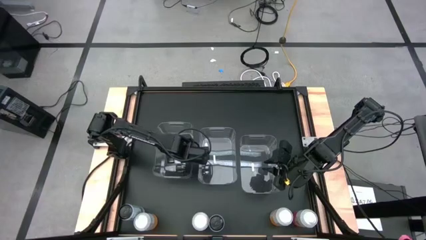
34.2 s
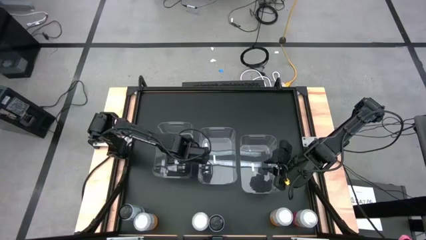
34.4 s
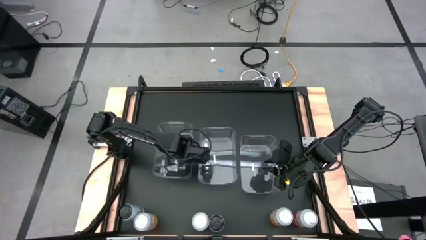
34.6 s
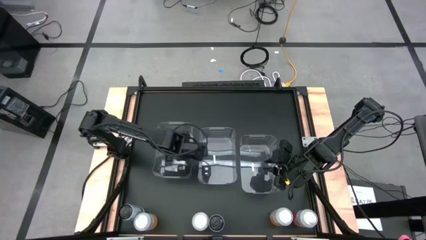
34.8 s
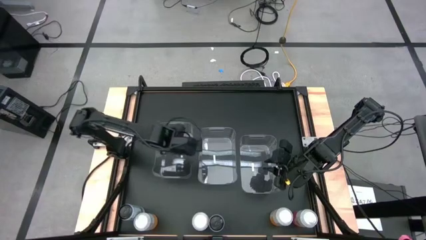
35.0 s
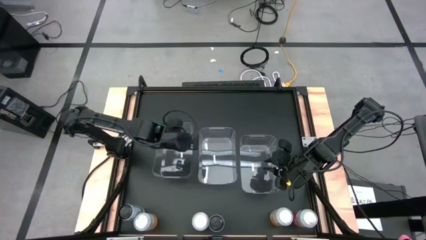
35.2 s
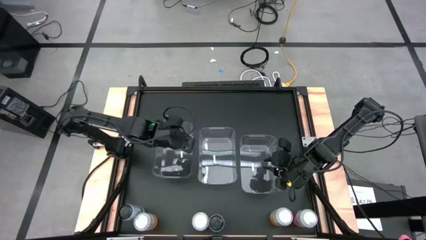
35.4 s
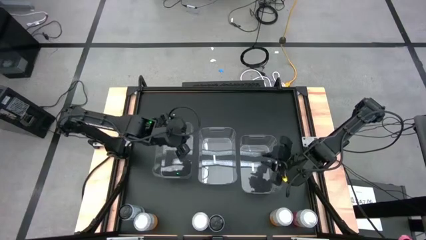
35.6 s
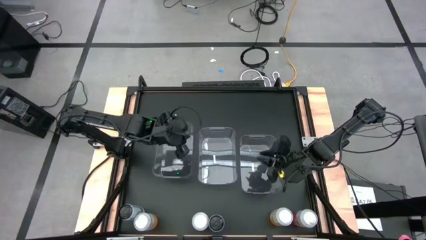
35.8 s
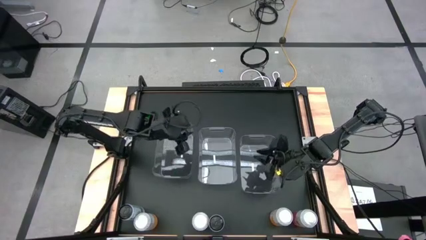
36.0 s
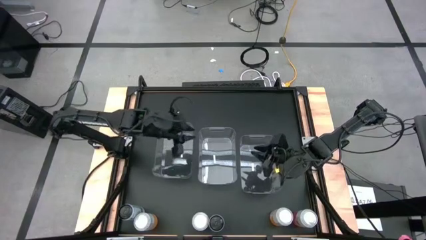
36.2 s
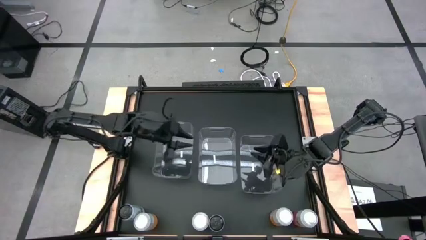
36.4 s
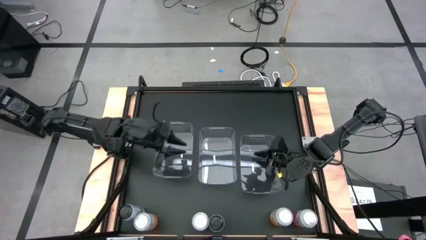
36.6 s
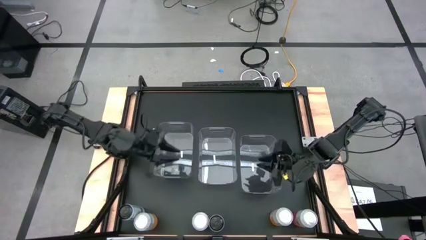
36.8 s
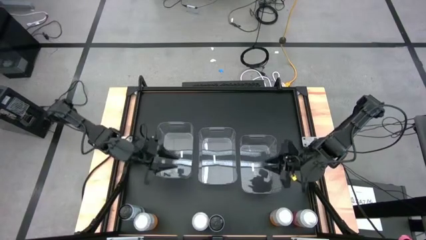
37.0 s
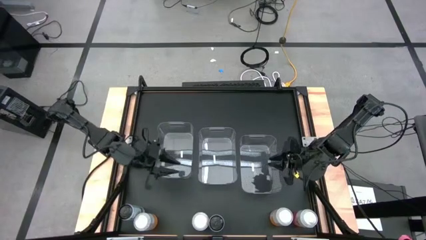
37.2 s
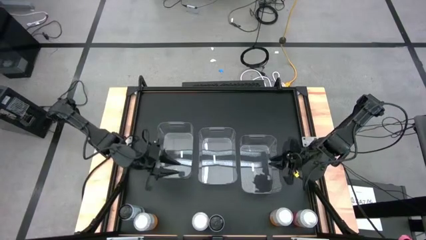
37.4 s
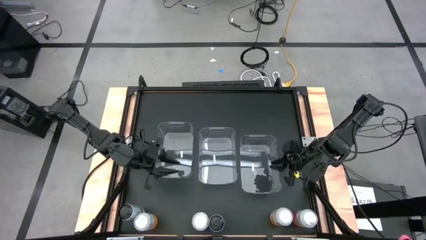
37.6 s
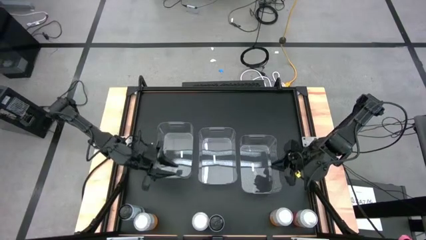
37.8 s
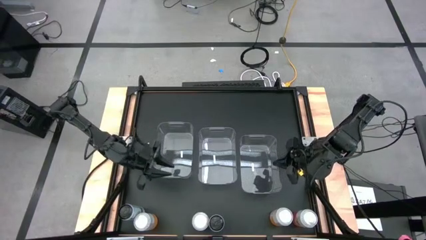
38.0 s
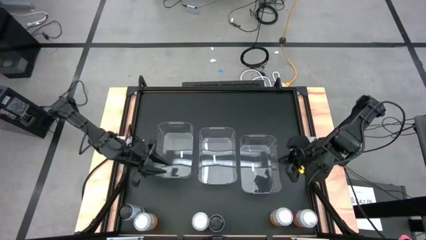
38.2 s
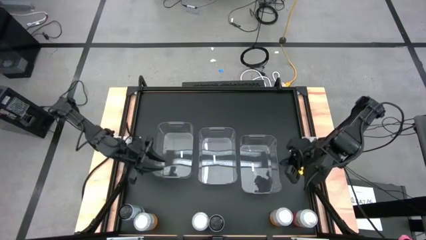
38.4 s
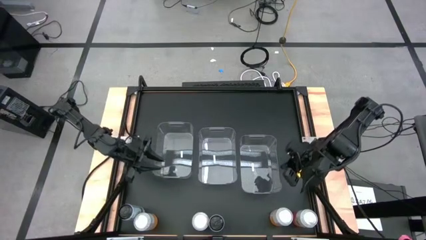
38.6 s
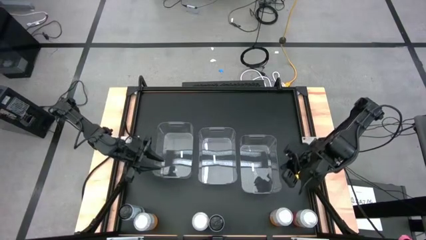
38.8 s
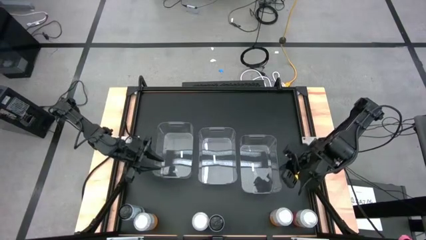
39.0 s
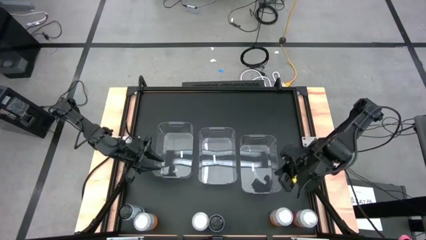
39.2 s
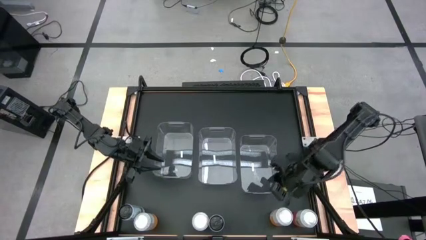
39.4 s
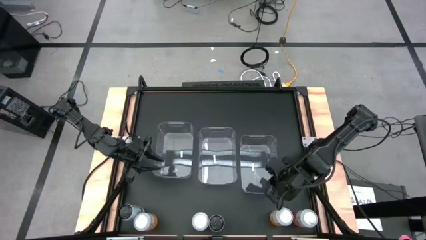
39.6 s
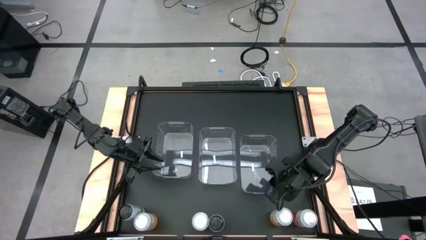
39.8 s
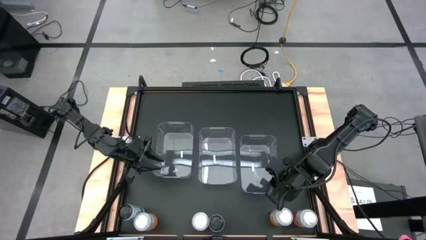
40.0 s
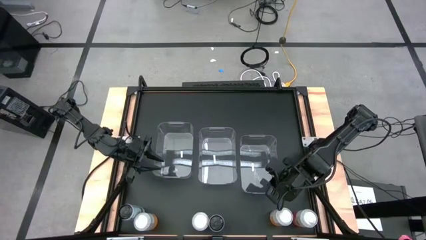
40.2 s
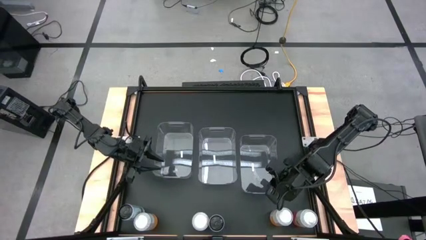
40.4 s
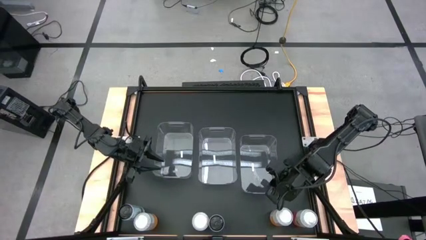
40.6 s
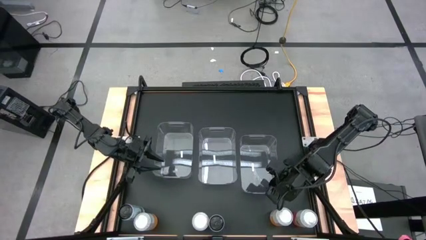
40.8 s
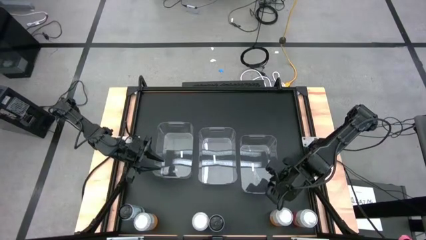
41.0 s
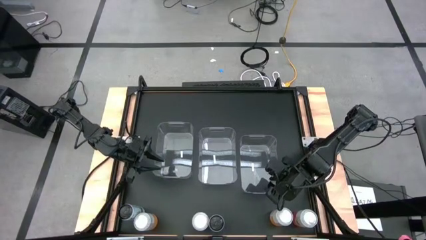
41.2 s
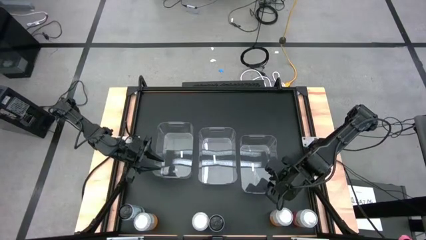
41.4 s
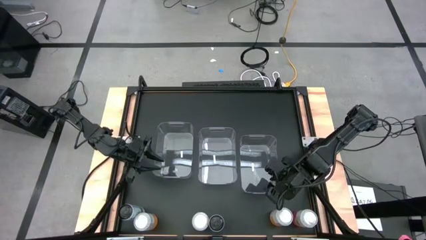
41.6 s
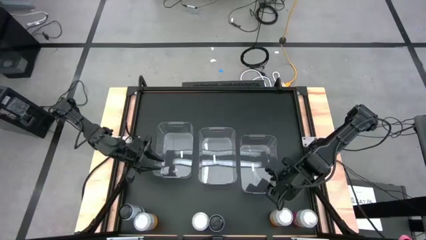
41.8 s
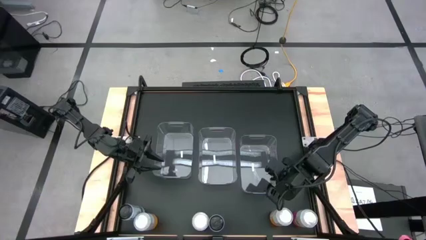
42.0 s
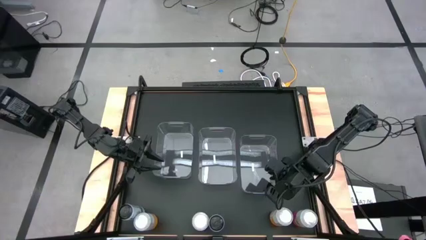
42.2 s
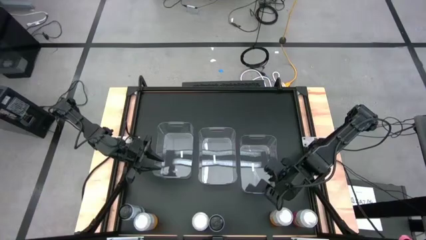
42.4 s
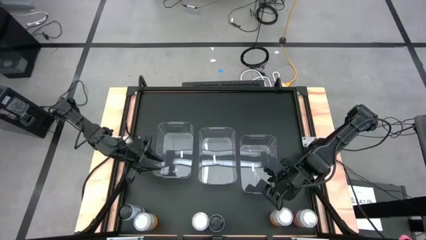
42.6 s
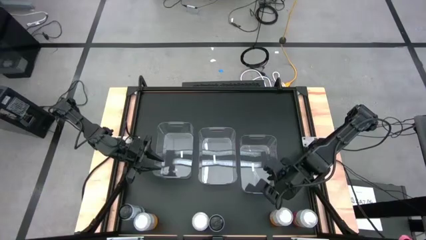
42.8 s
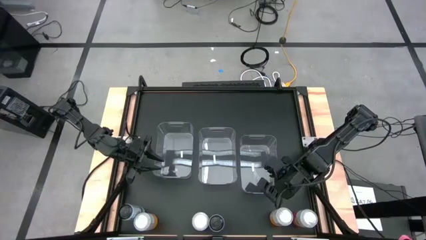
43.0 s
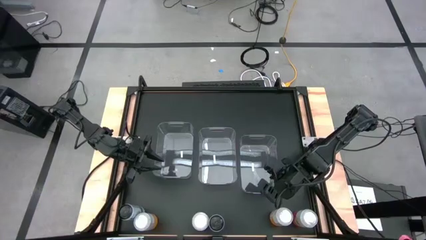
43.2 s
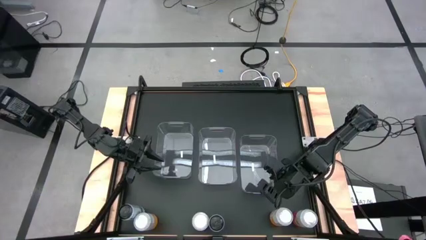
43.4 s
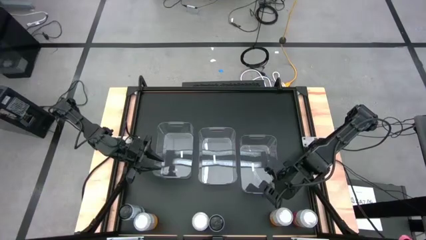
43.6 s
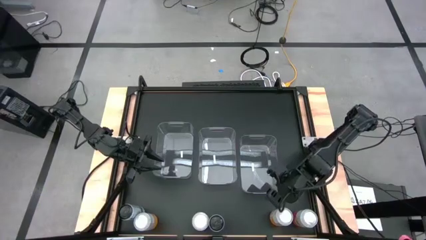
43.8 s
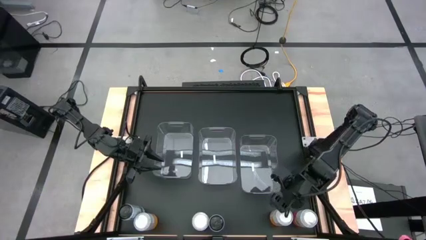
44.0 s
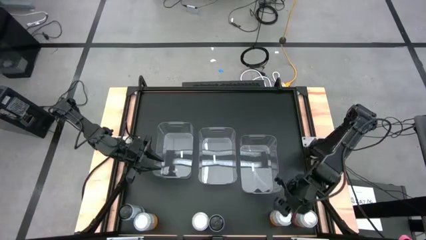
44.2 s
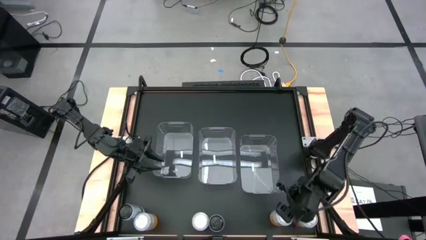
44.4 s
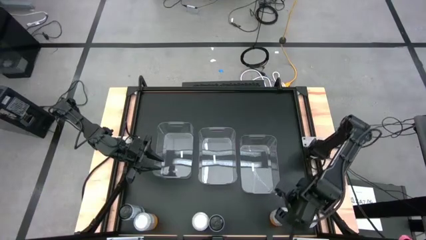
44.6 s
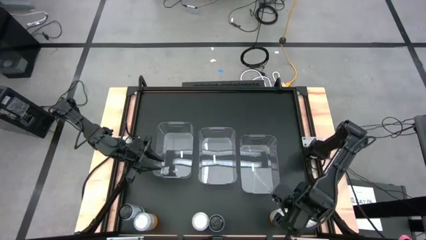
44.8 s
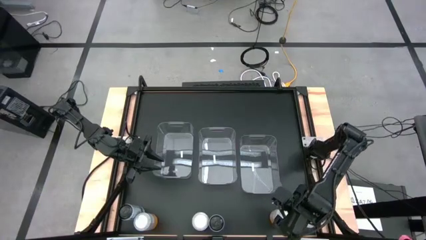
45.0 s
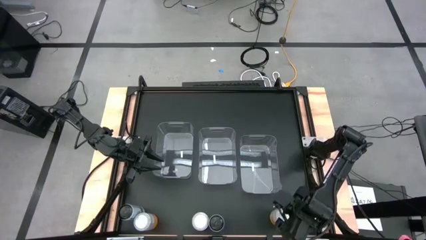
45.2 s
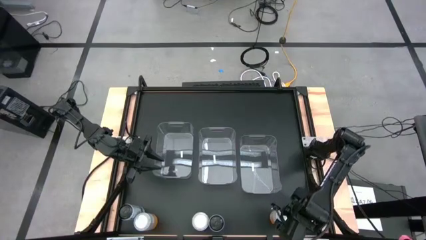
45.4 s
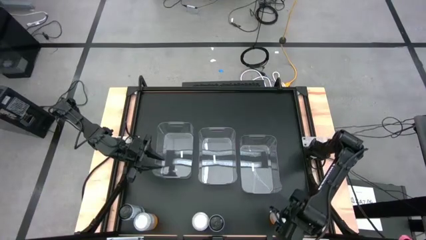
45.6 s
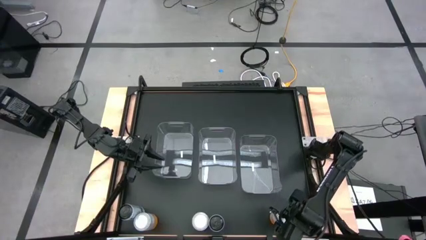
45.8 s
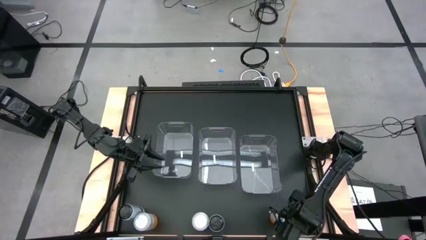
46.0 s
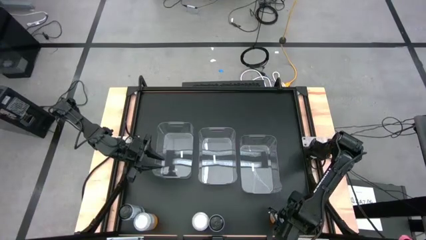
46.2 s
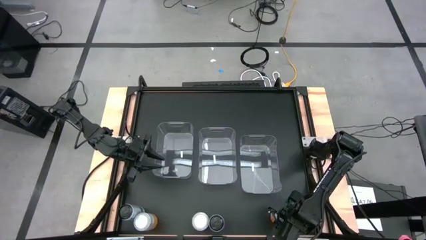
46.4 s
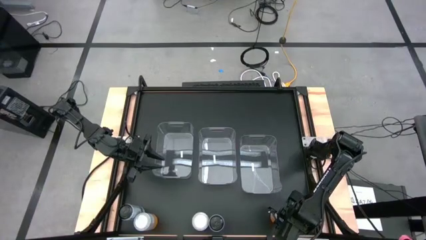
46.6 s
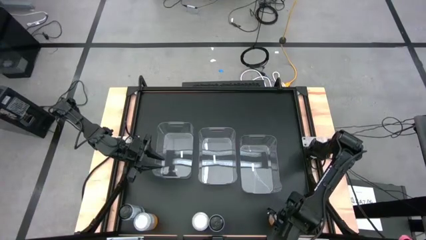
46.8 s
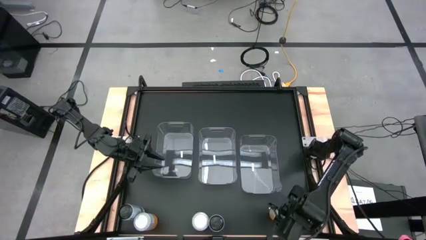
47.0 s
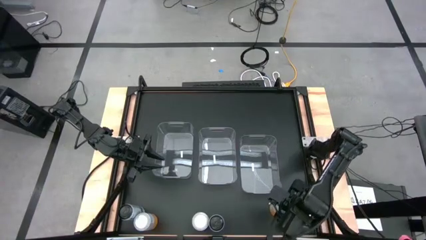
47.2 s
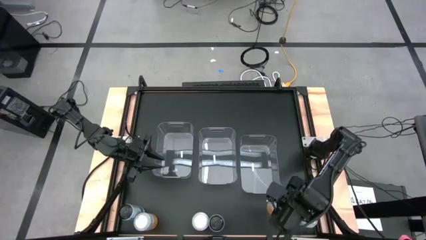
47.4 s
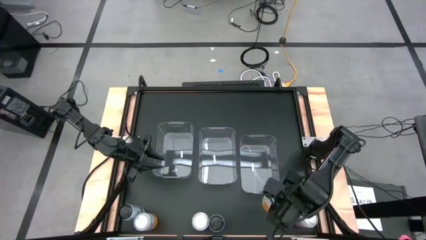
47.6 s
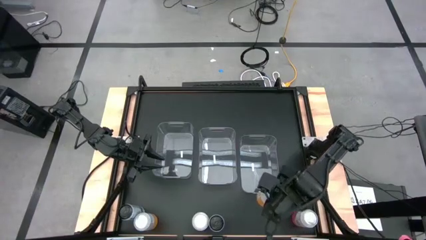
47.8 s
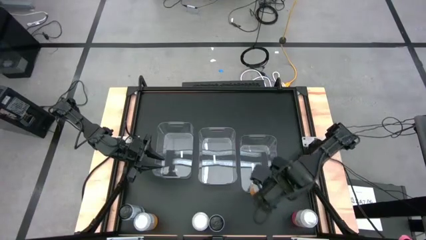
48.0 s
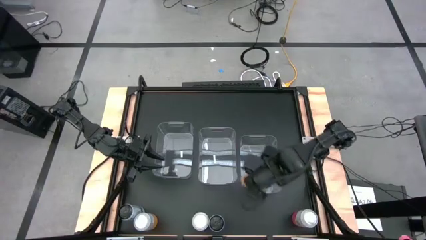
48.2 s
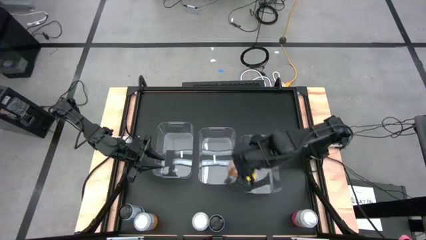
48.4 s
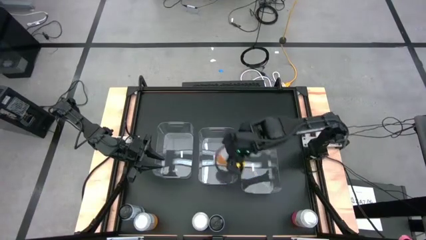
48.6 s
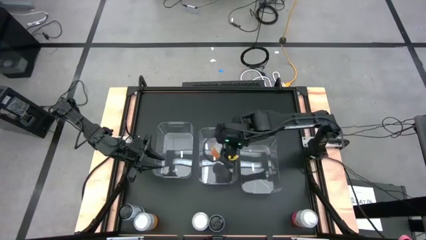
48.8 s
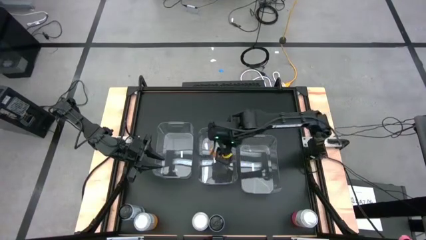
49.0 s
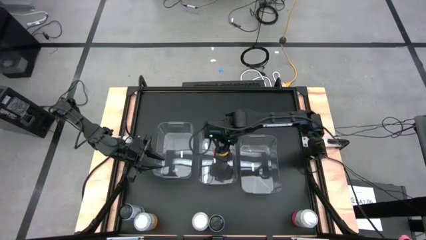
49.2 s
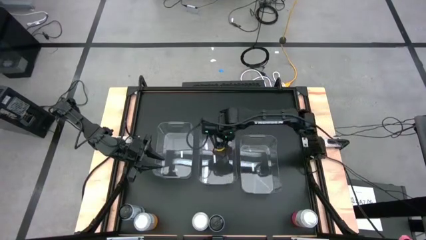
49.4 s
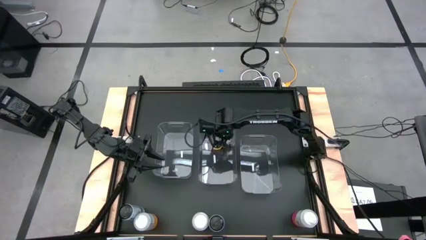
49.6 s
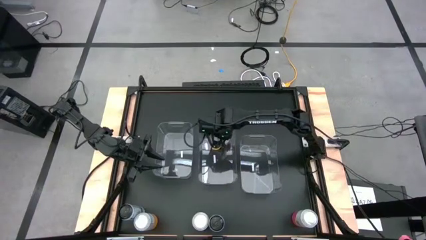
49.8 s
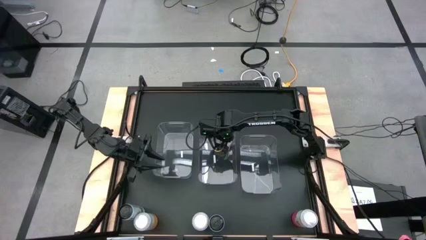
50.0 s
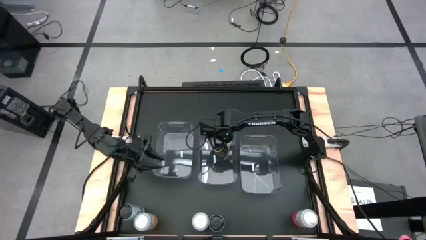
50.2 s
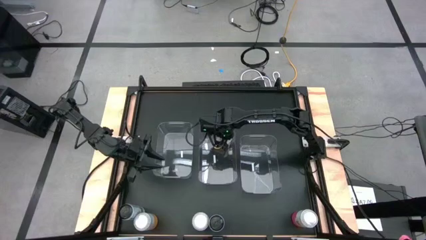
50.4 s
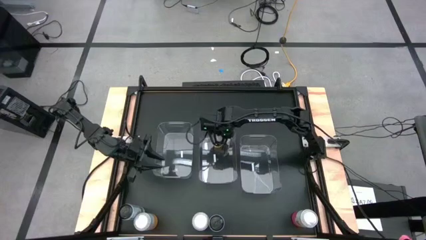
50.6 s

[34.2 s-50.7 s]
Task: Sort soda cans
Put the right orange soda can into the middle transparent bin
